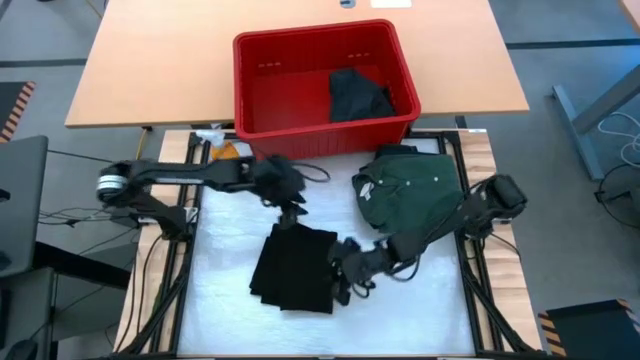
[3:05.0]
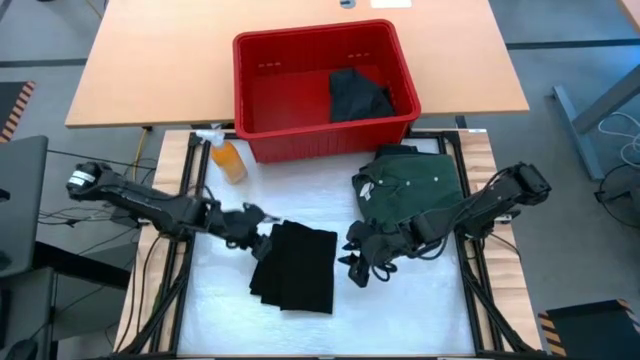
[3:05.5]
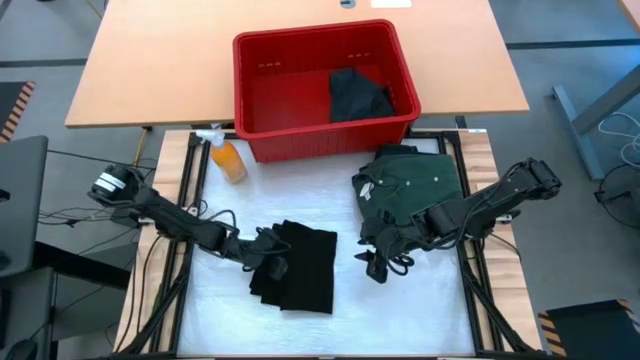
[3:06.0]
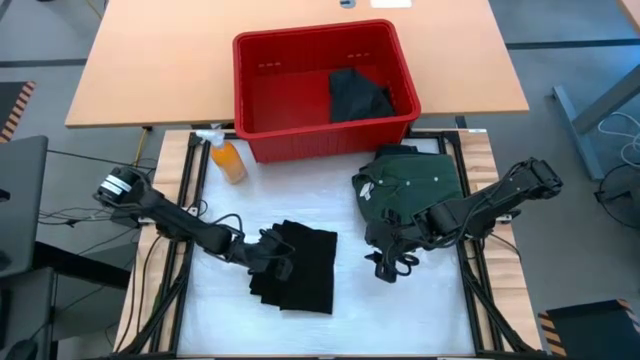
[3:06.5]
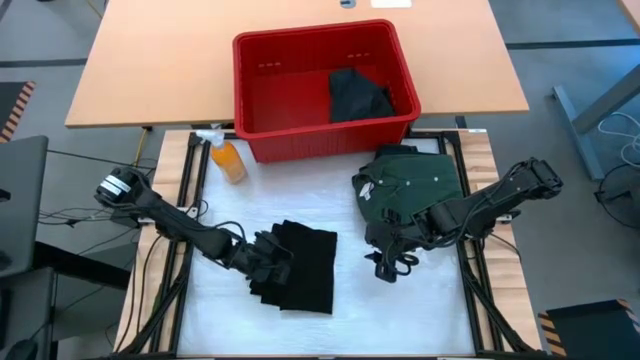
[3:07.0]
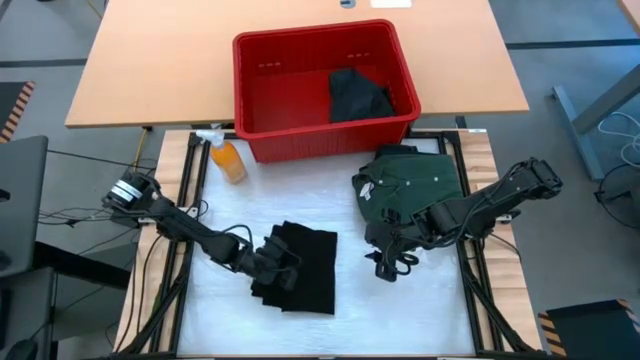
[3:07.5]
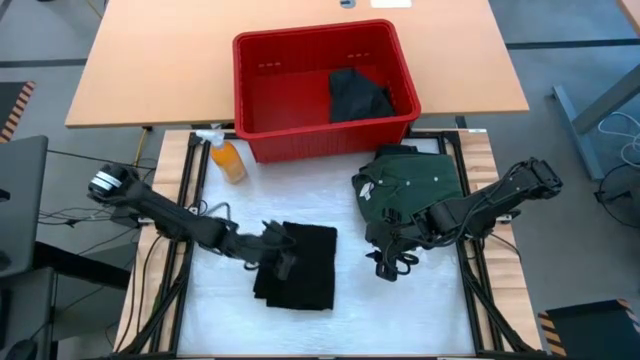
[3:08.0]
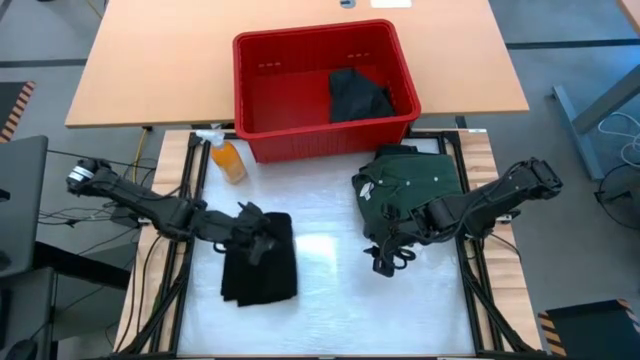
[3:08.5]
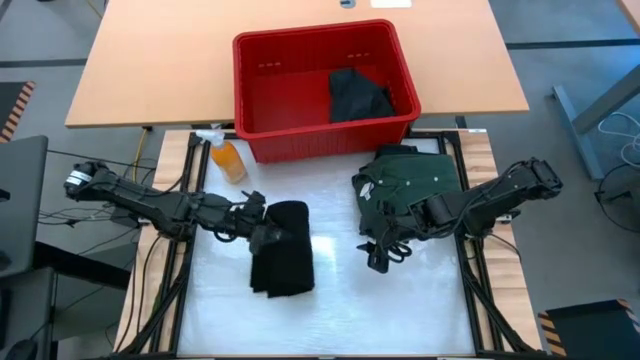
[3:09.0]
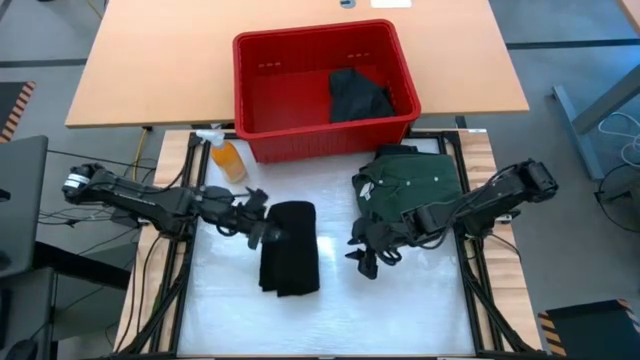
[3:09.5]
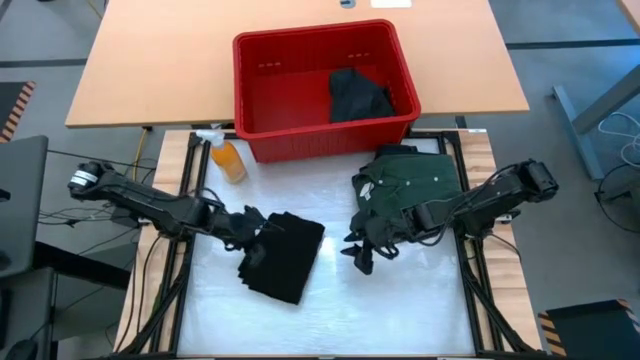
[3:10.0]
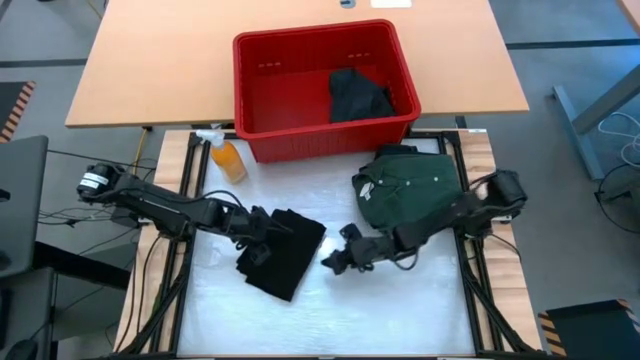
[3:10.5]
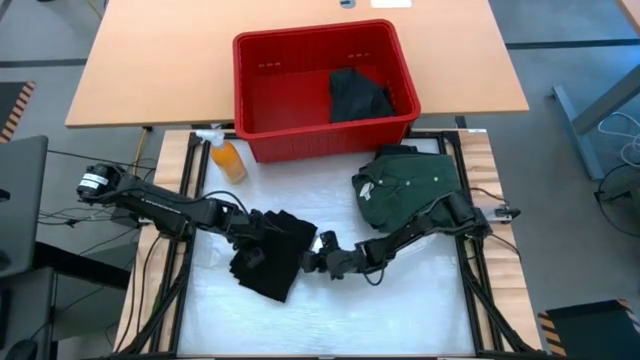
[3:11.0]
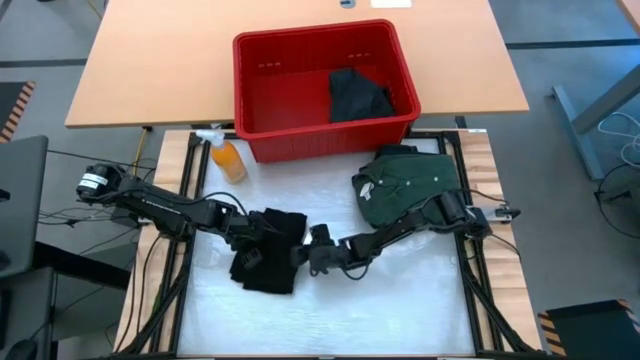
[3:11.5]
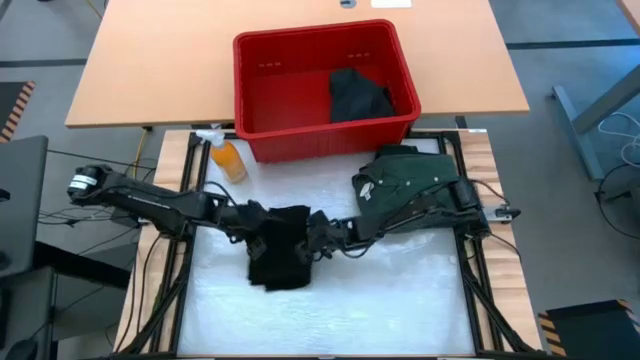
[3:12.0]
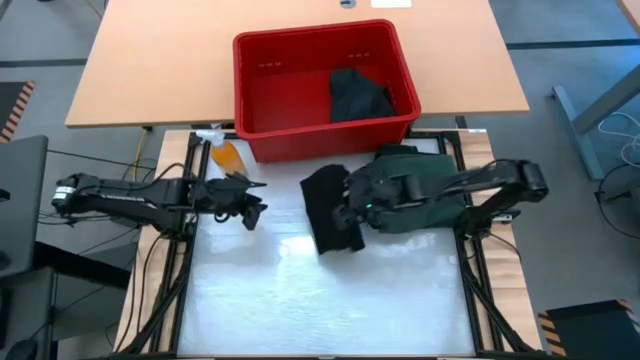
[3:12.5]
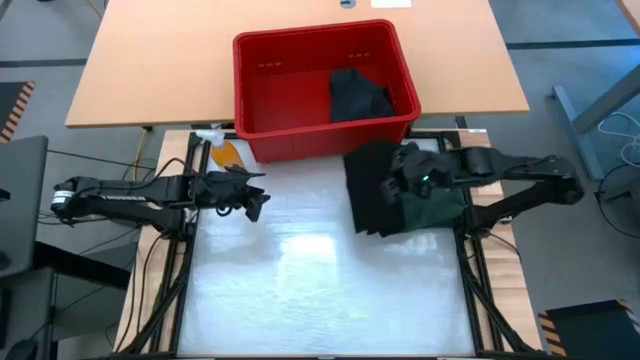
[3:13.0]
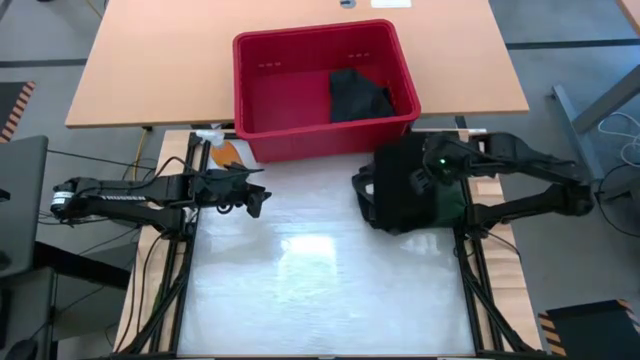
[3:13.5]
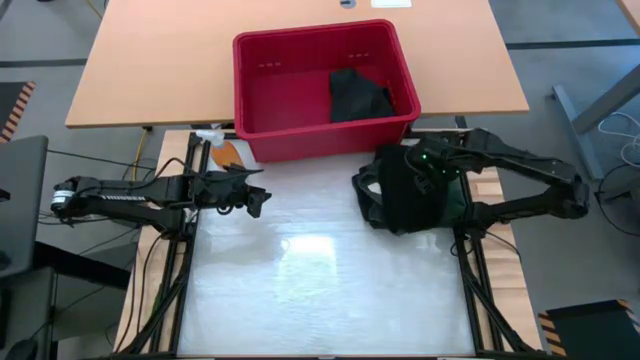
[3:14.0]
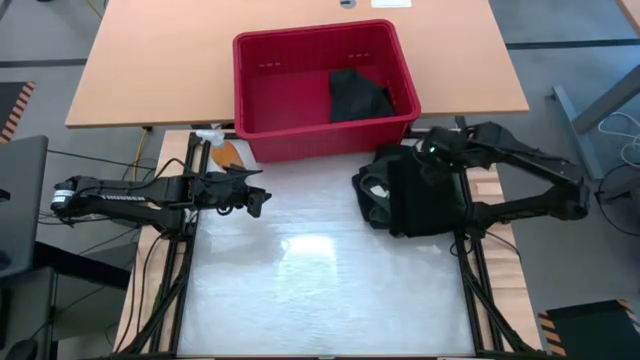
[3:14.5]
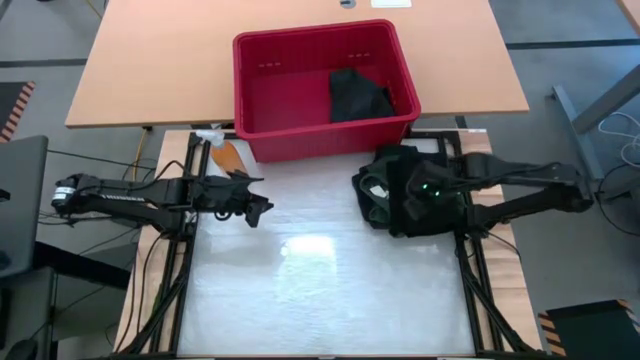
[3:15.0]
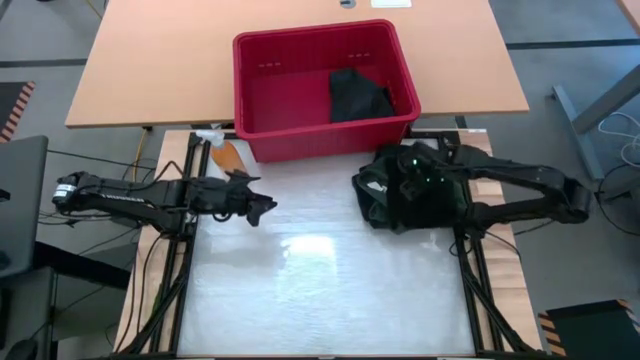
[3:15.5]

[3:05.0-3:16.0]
Task: Fold laundry
Stack the black shirt on top of the green polo shirt

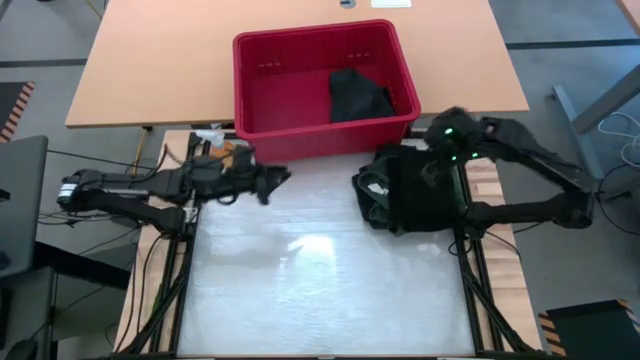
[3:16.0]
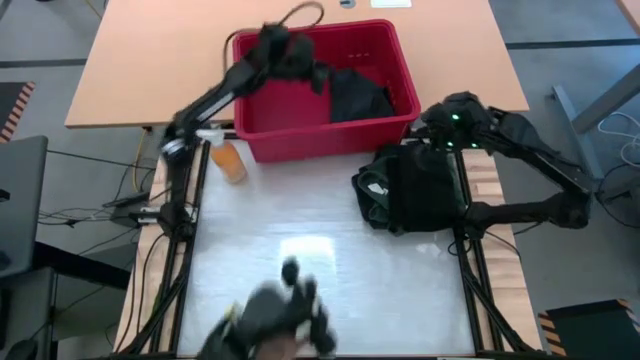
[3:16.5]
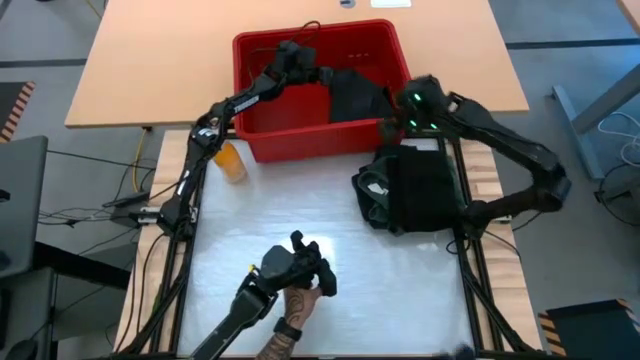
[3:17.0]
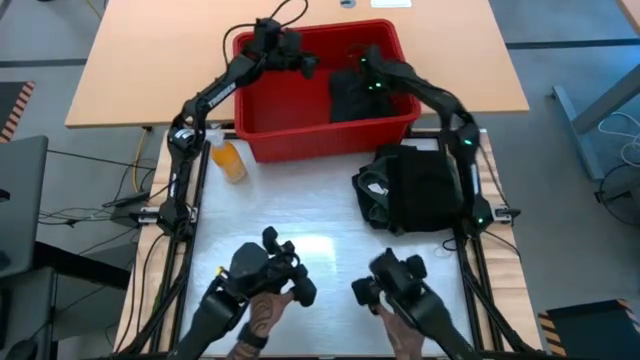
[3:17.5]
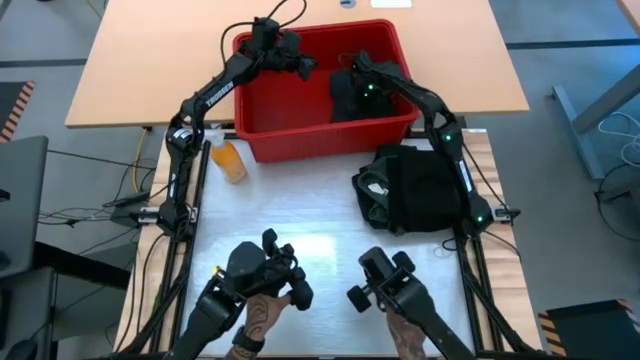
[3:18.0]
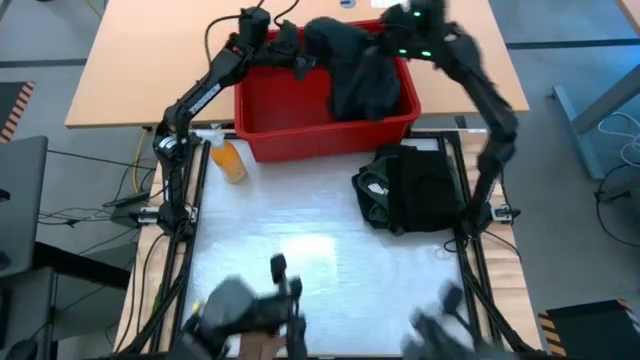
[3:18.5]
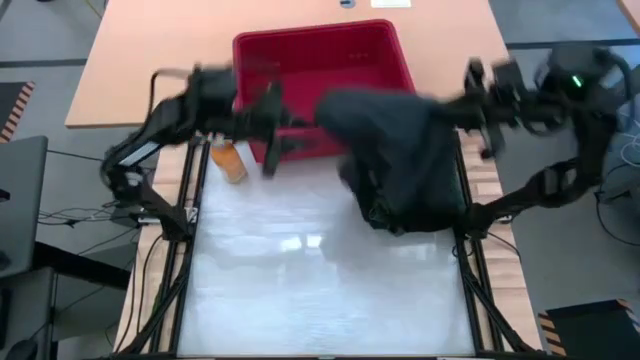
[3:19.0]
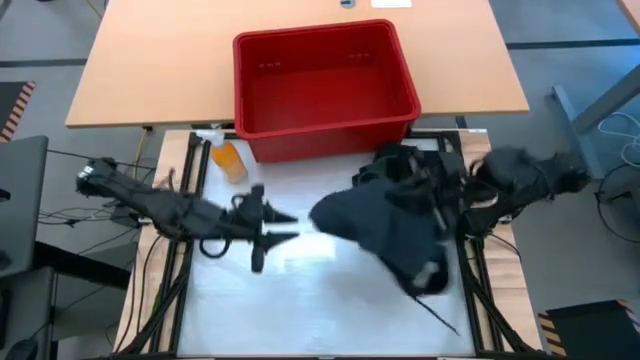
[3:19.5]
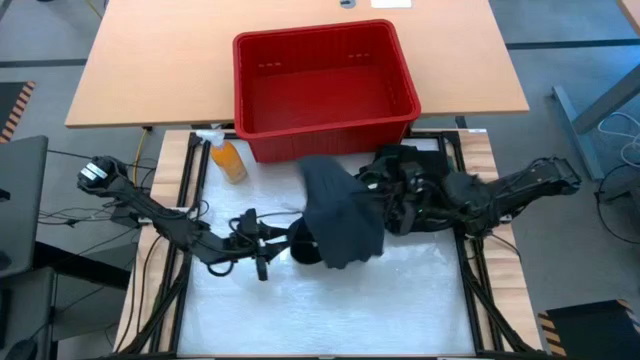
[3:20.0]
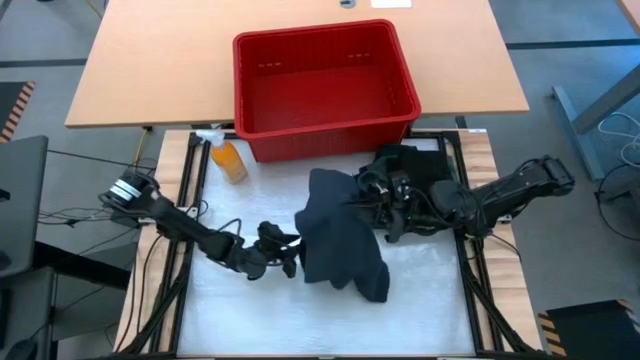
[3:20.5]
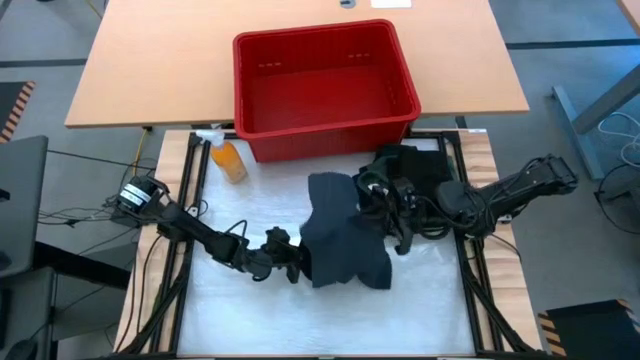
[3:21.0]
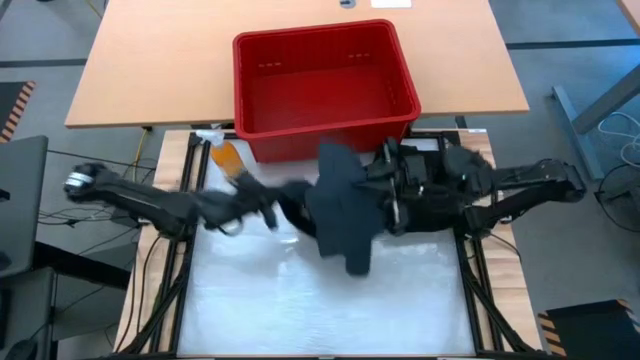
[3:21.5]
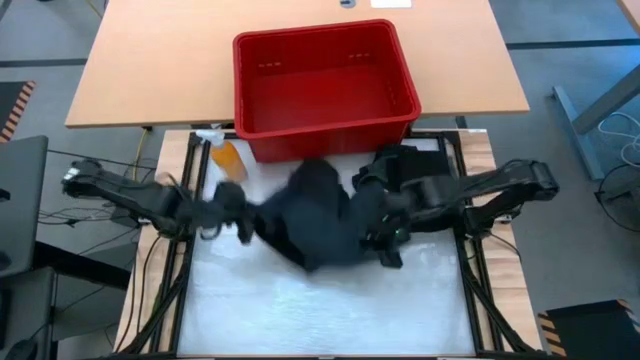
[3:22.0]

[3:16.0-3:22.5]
Remove the black shorts from the red laundry bin onto the table
